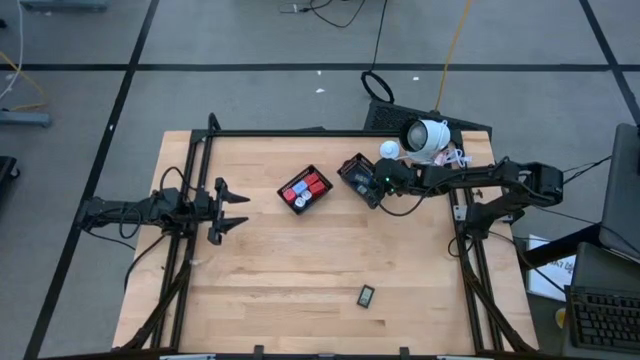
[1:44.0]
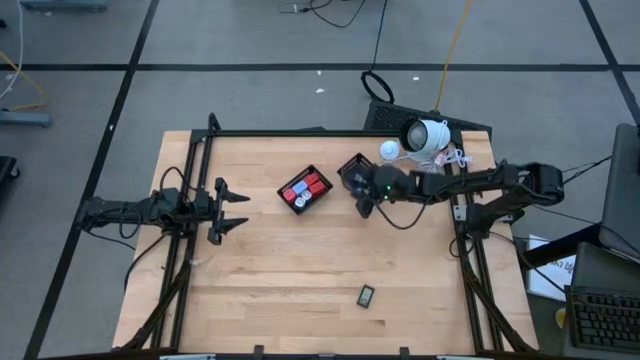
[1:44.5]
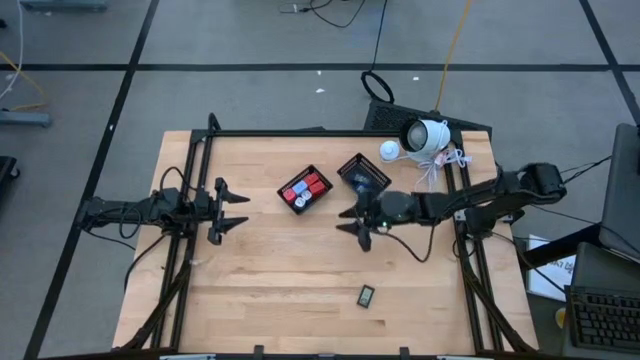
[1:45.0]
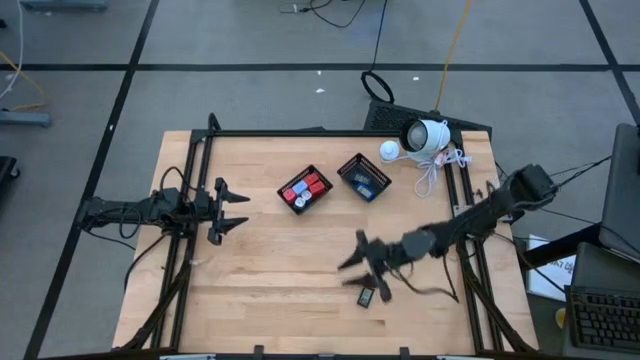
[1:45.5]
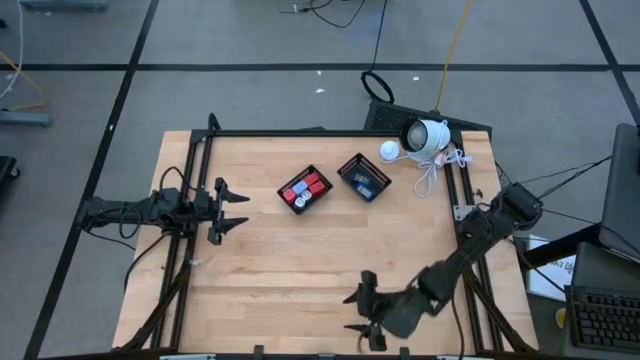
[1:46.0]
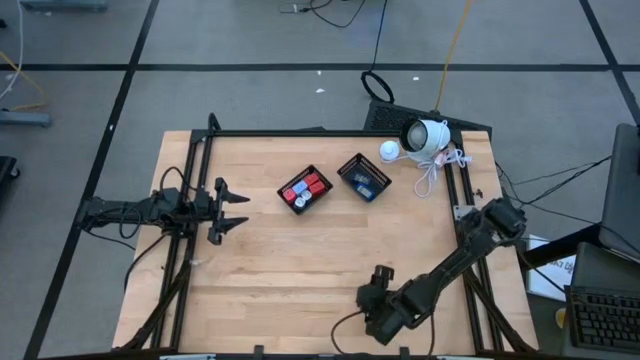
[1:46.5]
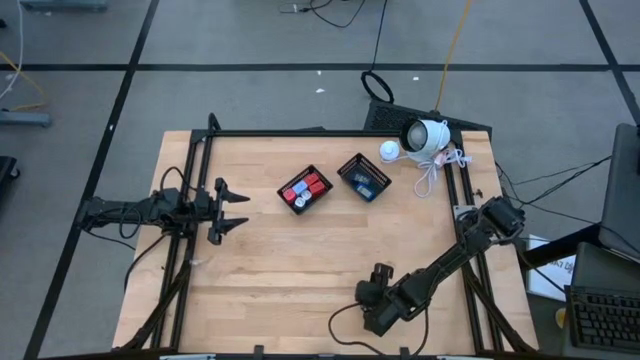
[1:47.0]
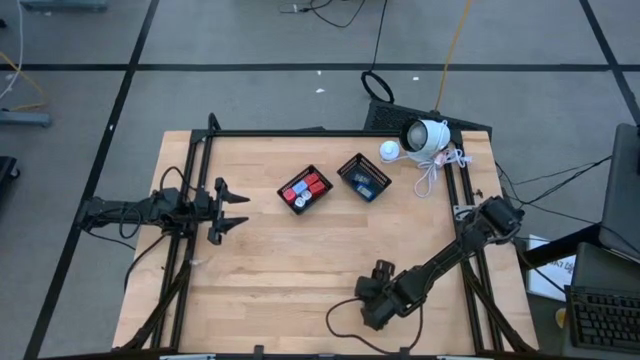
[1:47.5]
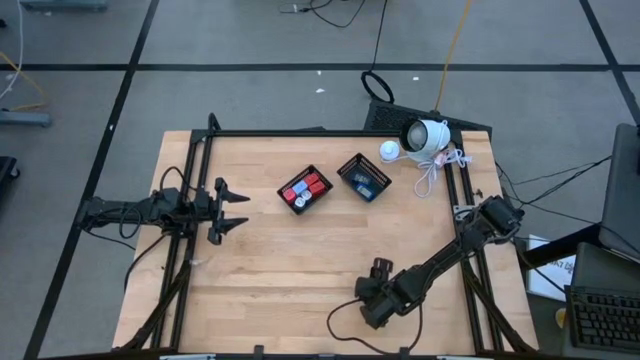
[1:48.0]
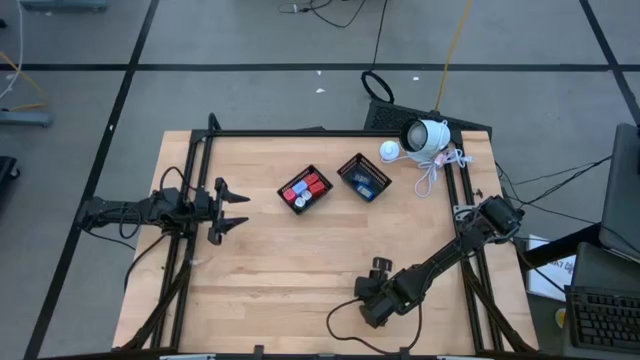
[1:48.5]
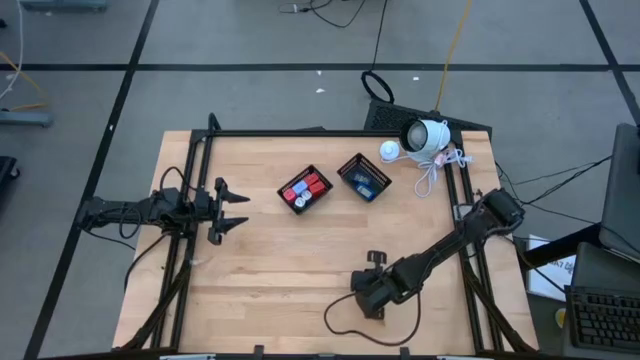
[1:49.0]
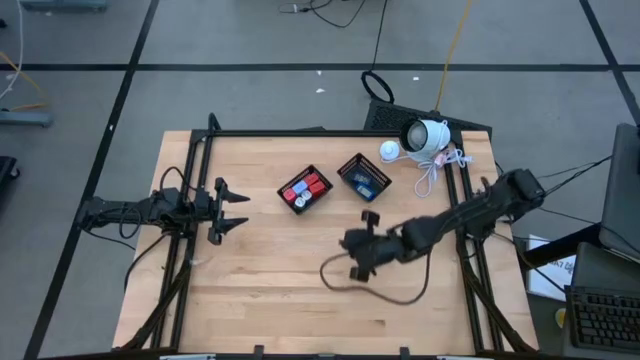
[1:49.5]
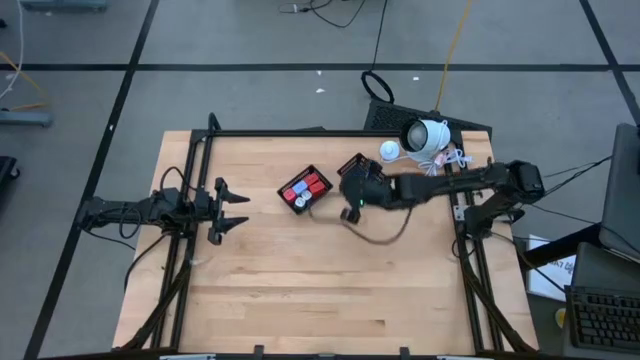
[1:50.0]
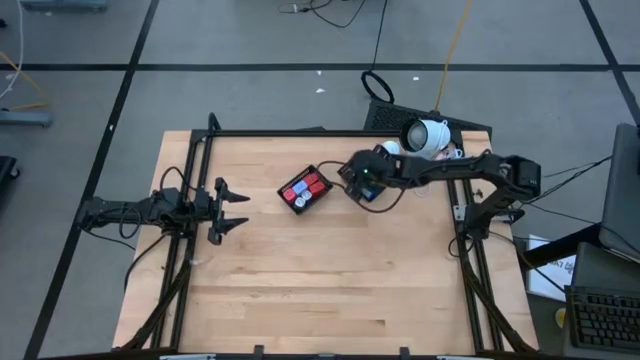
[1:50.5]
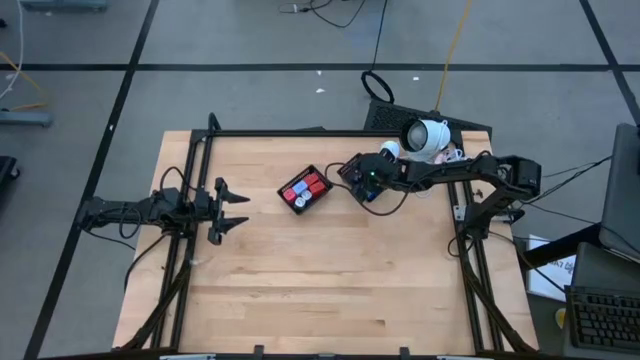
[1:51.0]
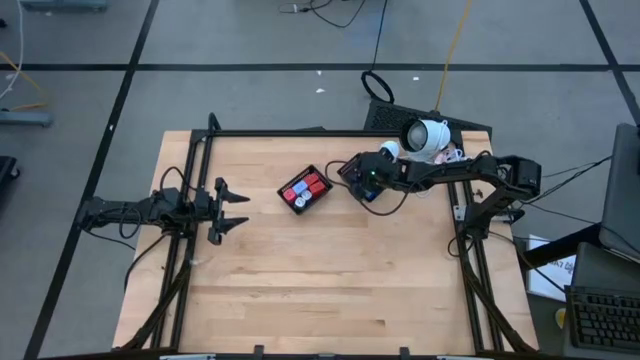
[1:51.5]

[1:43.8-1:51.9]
Task: Pick & Place Office items
Put the black digital timer into the right black bin

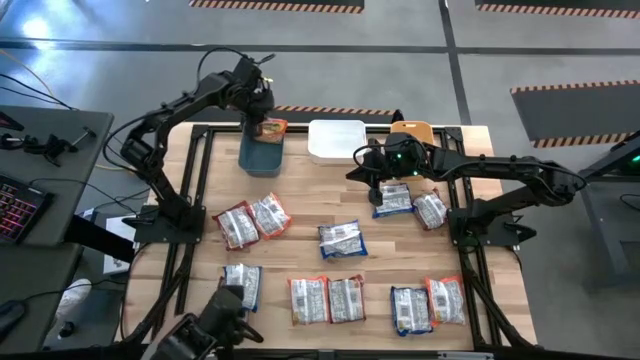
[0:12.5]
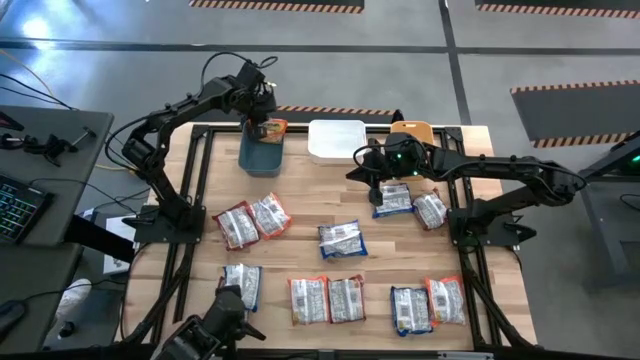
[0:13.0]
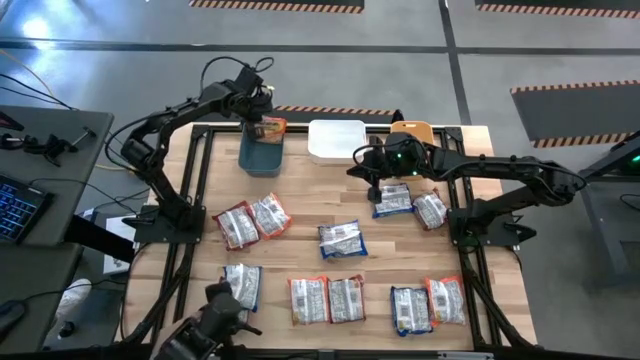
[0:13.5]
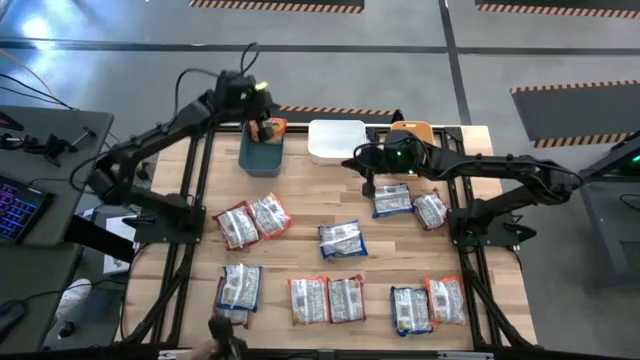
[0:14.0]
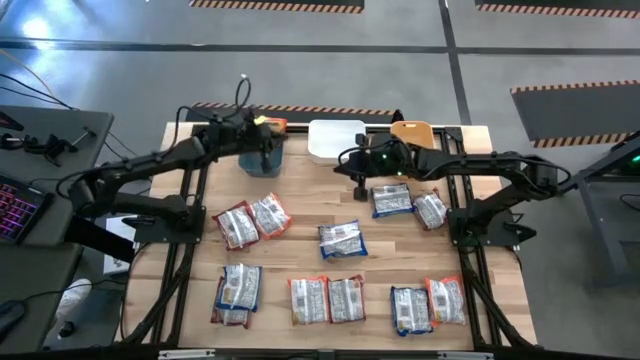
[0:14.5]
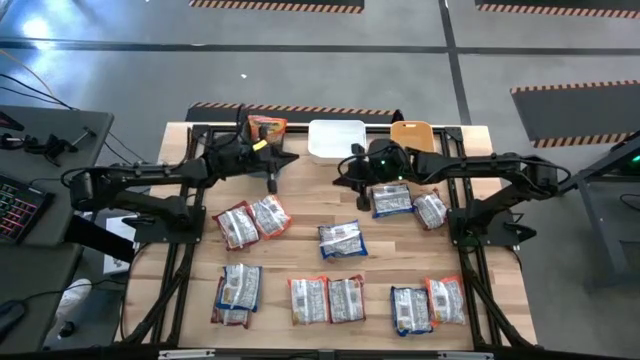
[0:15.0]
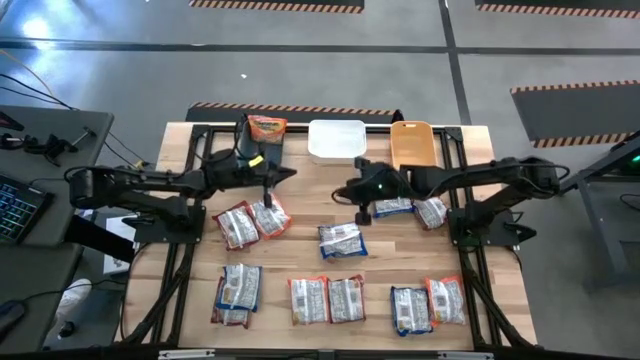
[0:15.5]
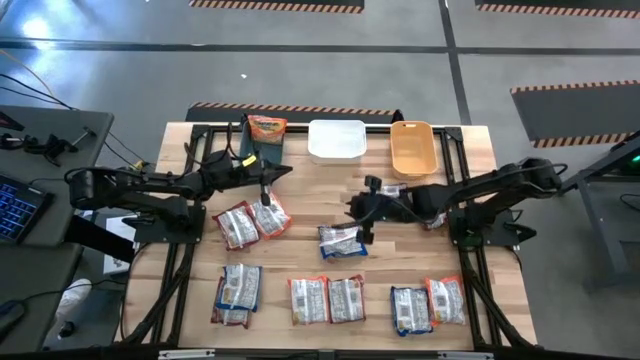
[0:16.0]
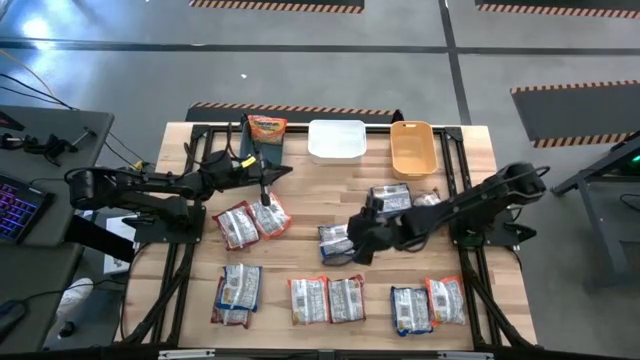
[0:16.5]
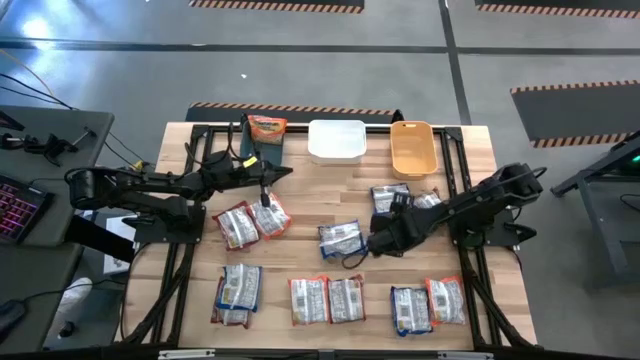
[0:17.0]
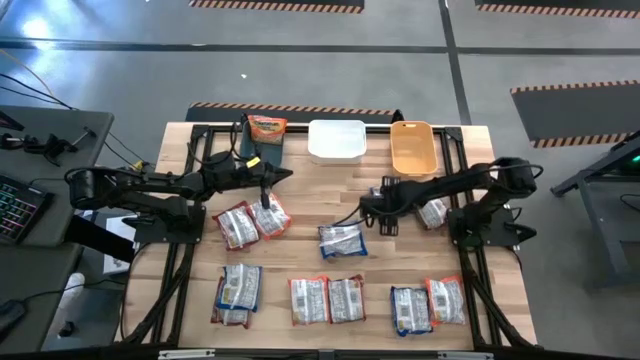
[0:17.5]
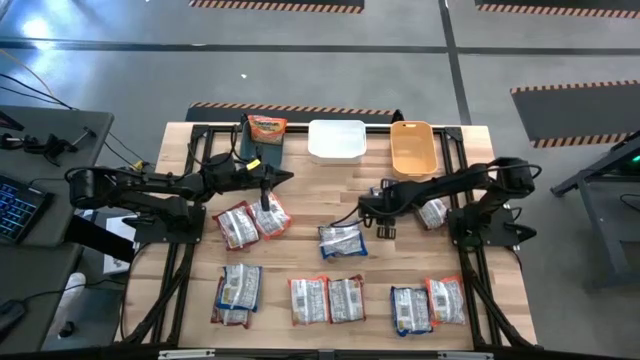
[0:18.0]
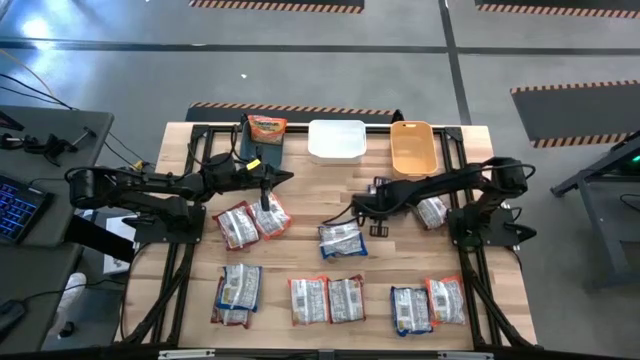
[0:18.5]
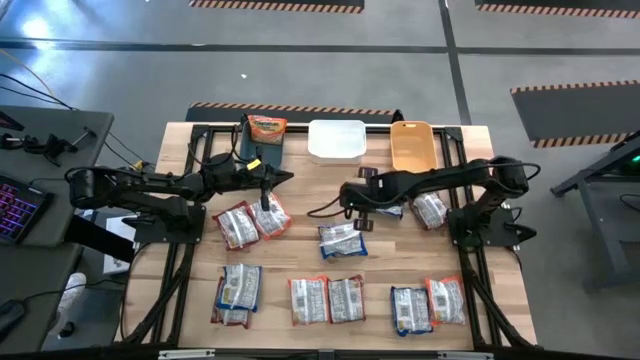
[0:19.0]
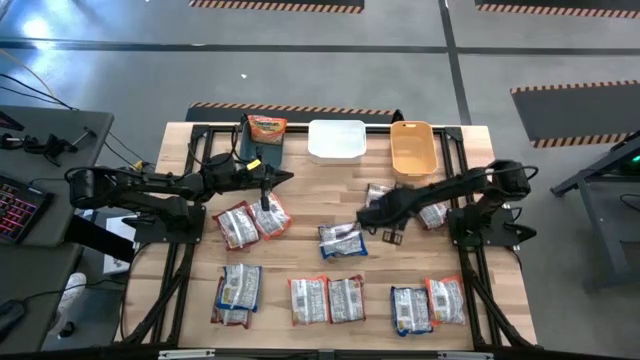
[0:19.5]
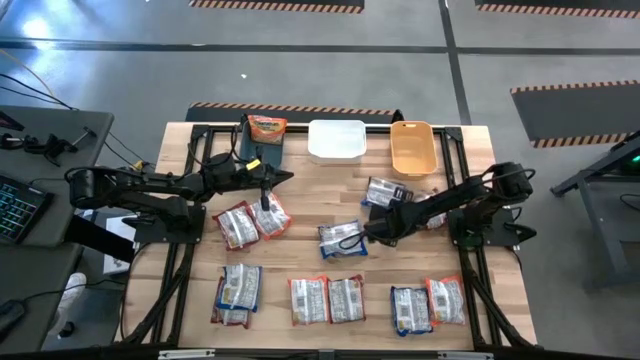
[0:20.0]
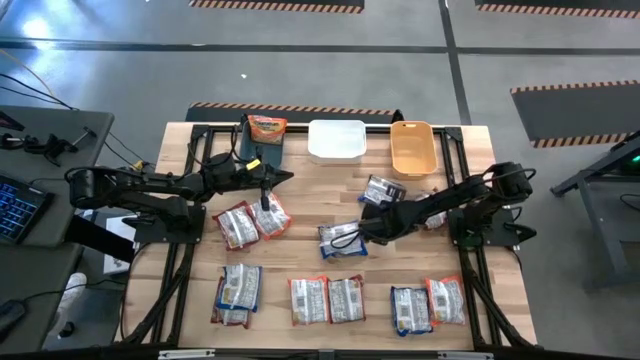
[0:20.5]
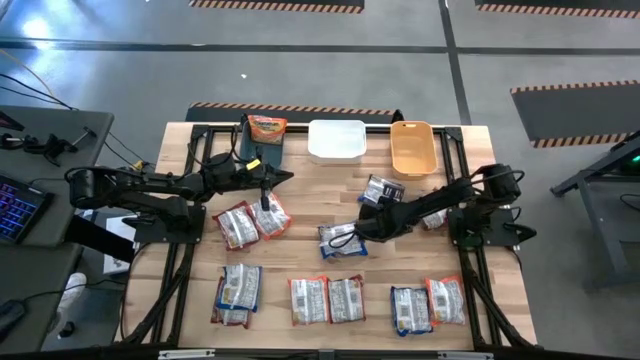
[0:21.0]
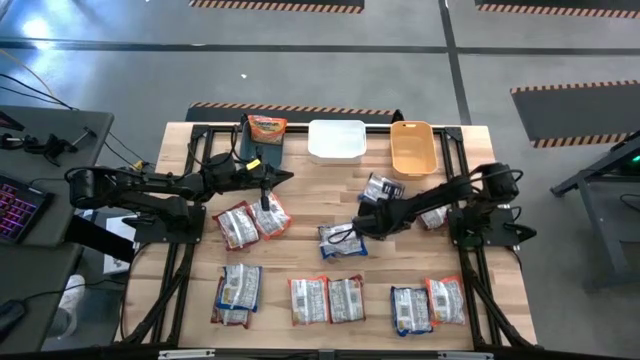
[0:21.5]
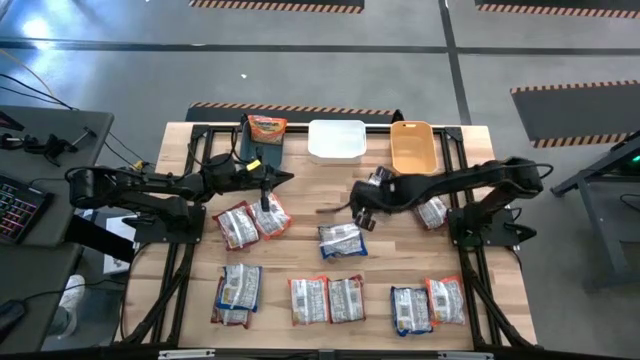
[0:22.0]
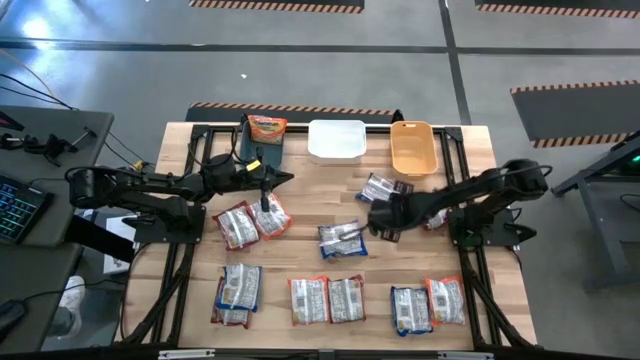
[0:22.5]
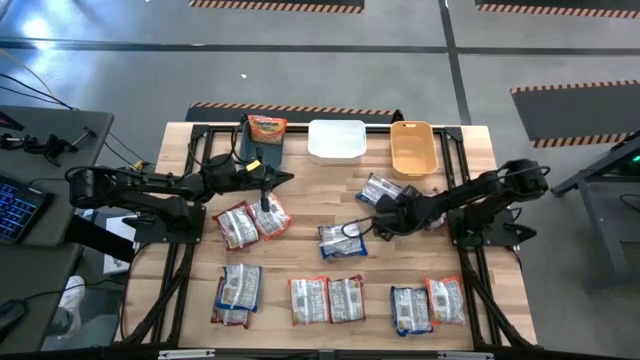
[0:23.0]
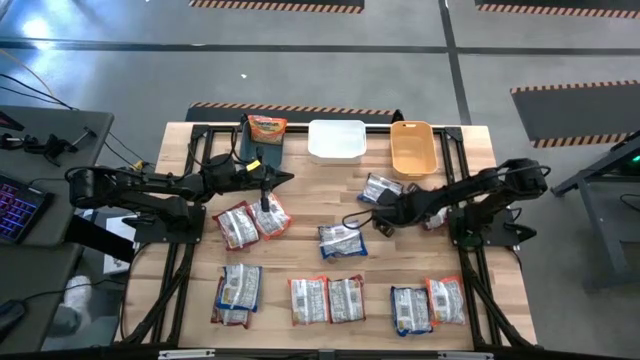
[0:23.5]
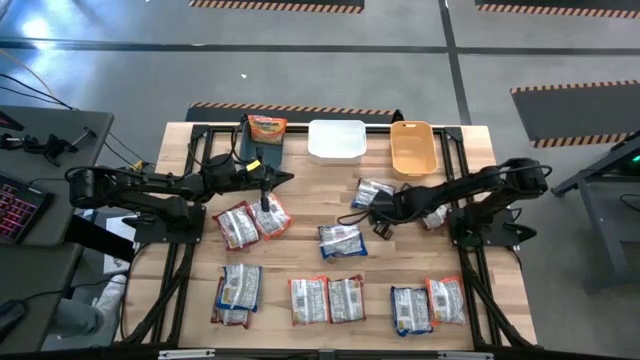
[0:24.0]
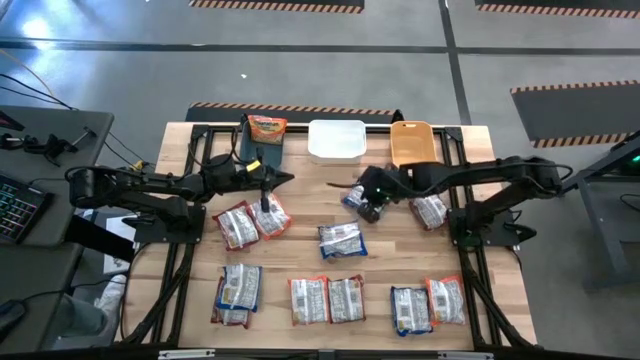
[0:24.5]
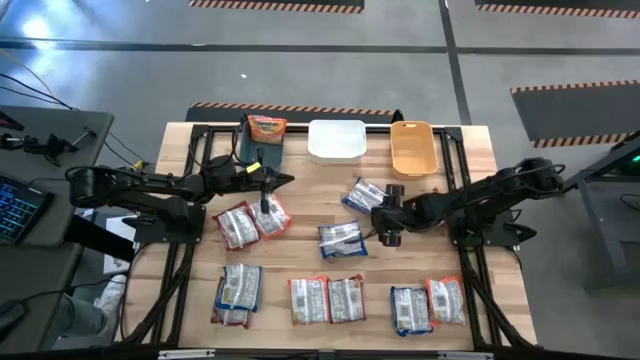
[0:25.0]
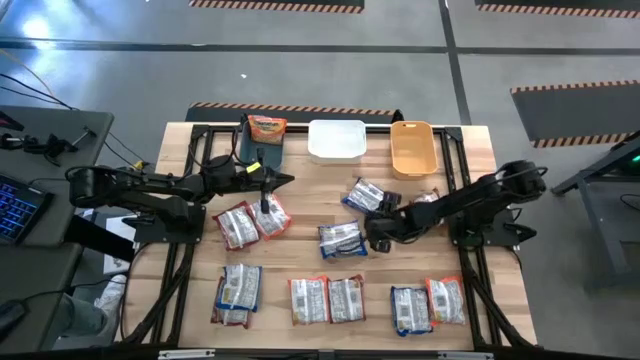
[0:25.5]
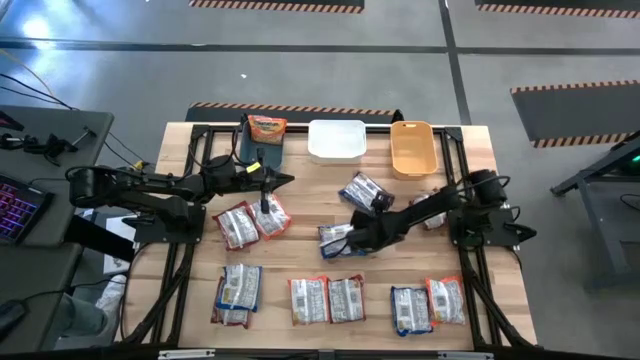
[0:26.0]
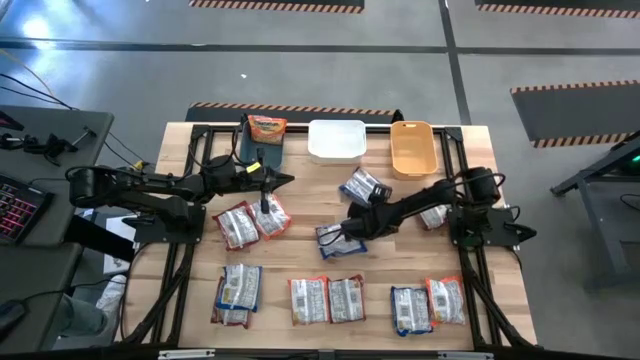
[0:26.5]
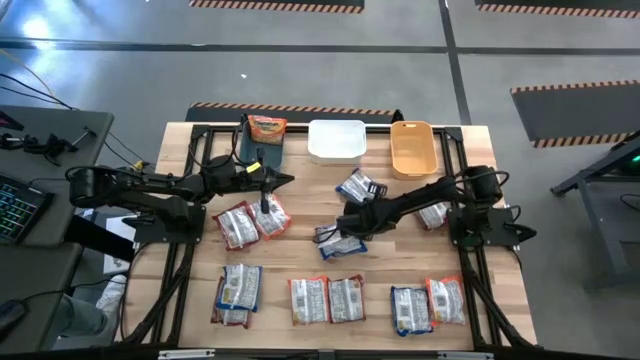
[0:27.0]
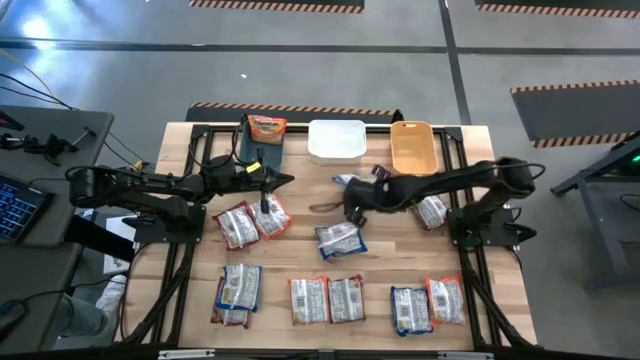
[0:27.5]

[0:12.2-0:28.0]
Task: Sort Maruchan noodles
Put the top blue noodle pack into the white bin
